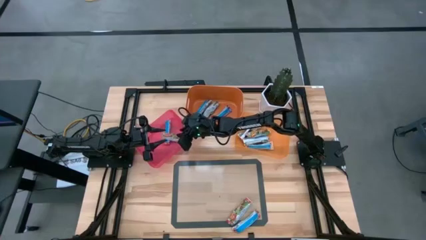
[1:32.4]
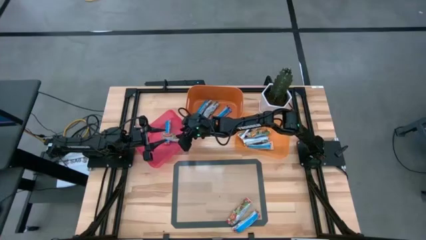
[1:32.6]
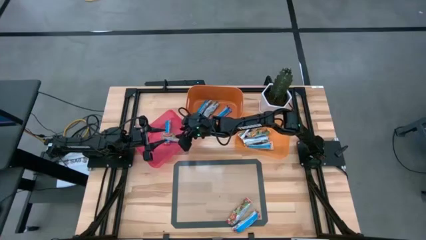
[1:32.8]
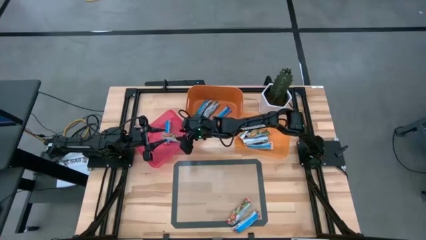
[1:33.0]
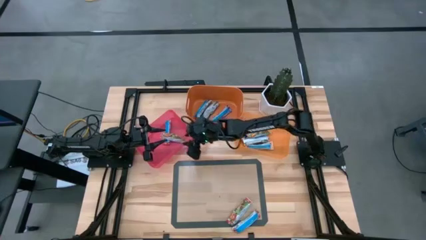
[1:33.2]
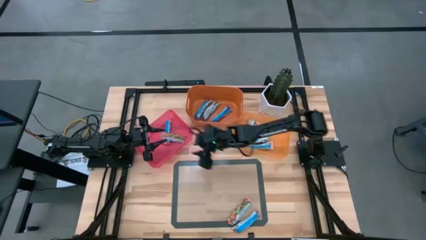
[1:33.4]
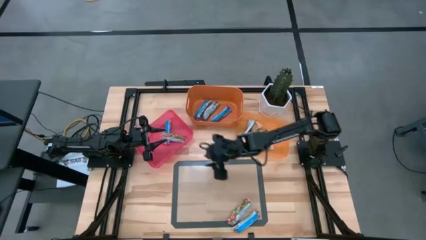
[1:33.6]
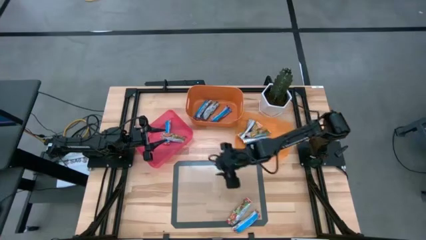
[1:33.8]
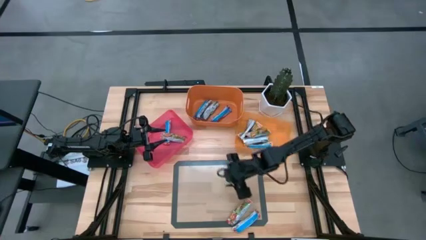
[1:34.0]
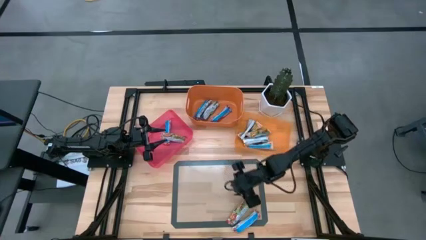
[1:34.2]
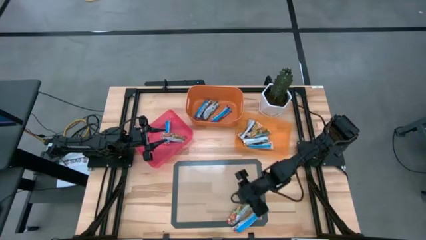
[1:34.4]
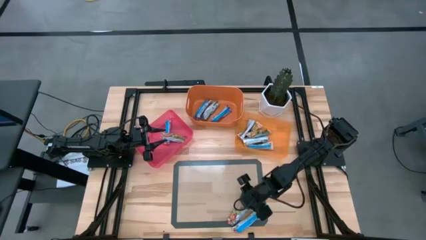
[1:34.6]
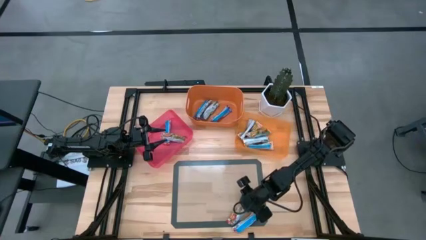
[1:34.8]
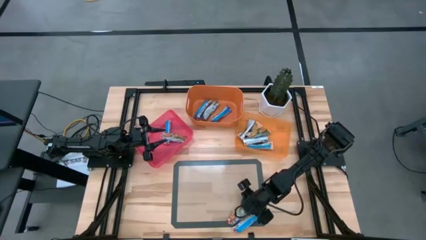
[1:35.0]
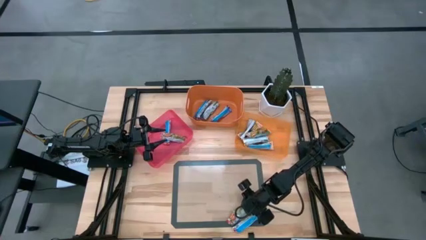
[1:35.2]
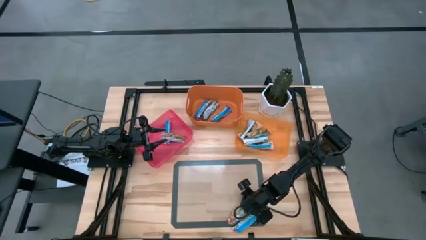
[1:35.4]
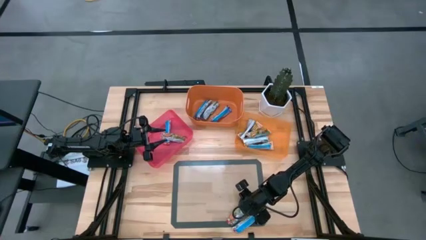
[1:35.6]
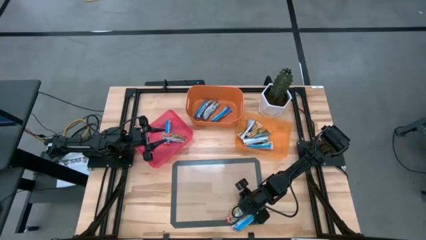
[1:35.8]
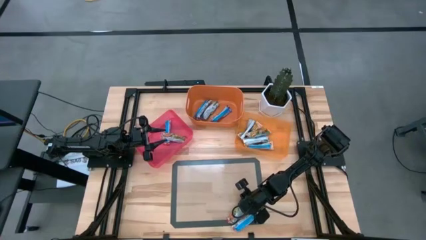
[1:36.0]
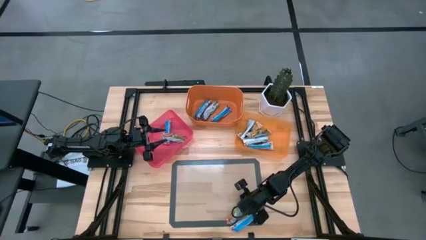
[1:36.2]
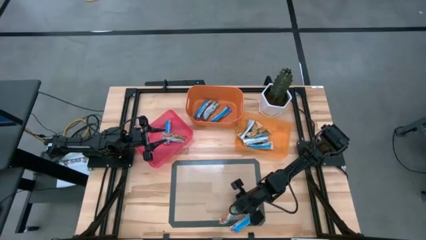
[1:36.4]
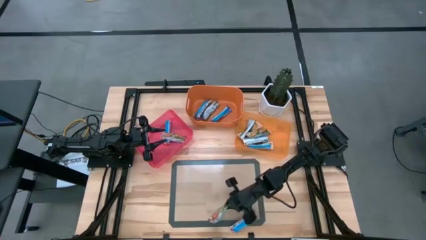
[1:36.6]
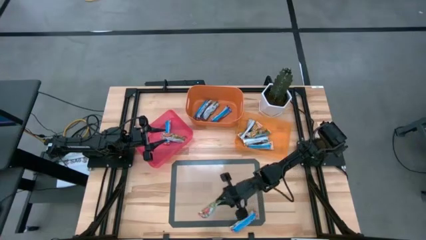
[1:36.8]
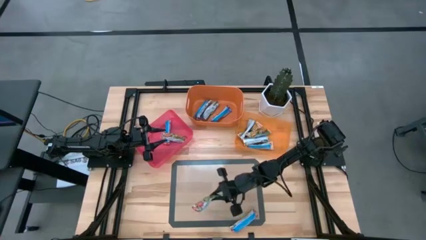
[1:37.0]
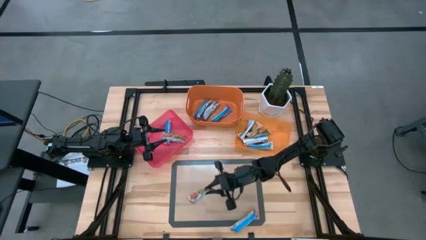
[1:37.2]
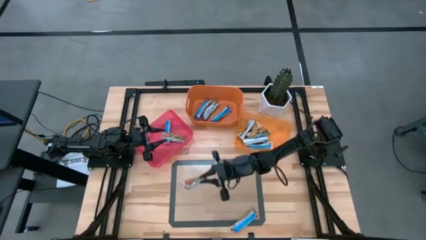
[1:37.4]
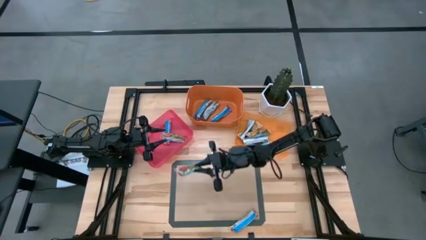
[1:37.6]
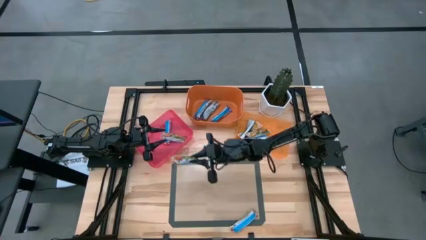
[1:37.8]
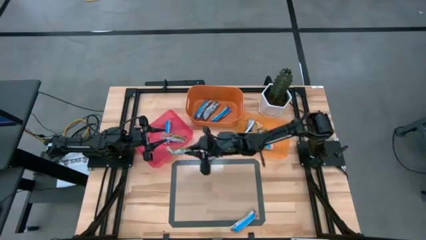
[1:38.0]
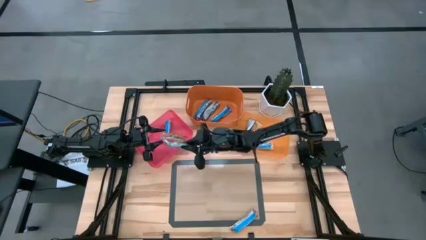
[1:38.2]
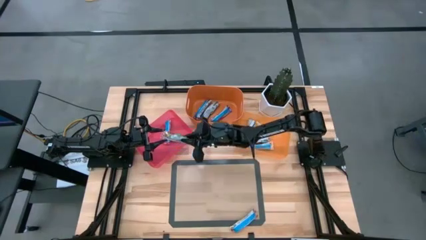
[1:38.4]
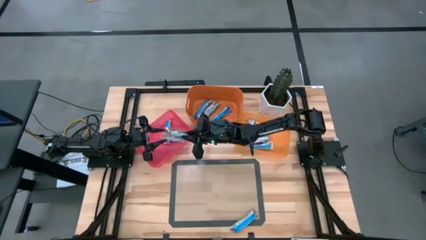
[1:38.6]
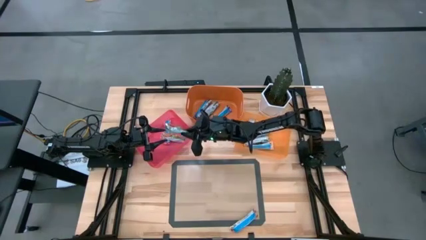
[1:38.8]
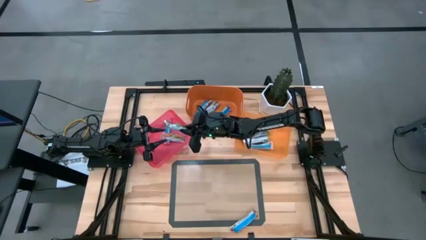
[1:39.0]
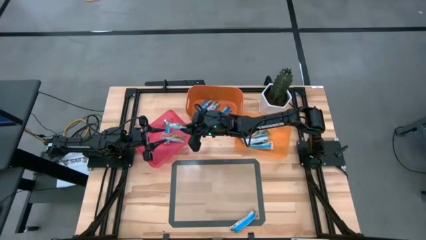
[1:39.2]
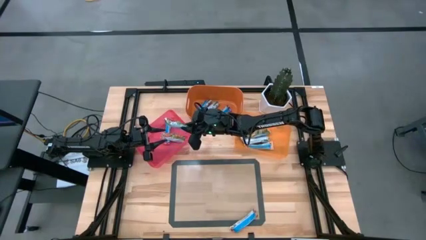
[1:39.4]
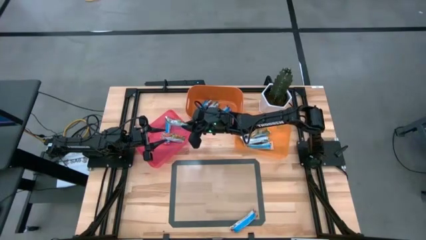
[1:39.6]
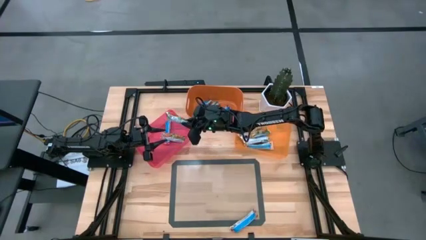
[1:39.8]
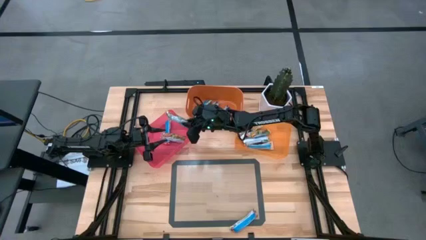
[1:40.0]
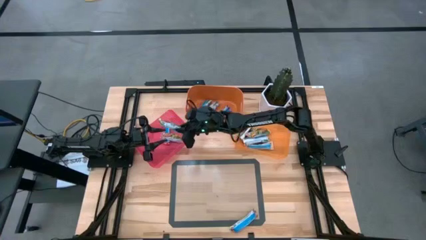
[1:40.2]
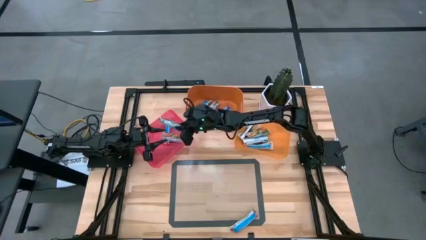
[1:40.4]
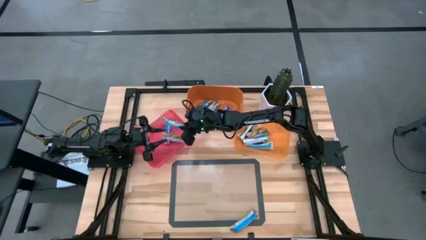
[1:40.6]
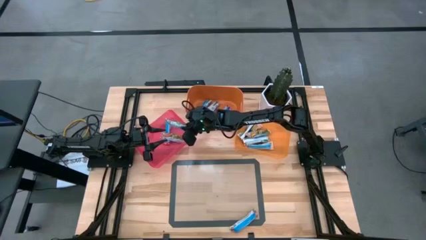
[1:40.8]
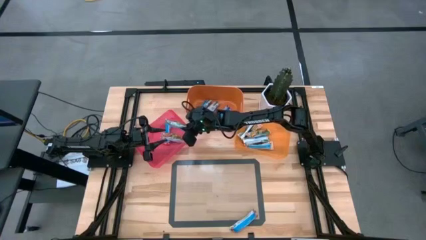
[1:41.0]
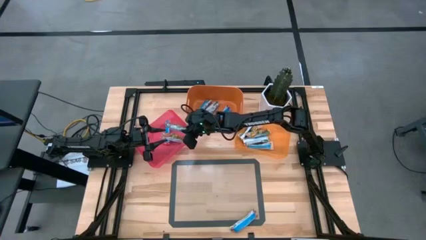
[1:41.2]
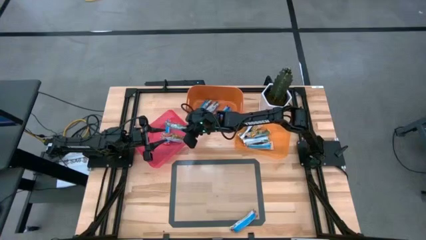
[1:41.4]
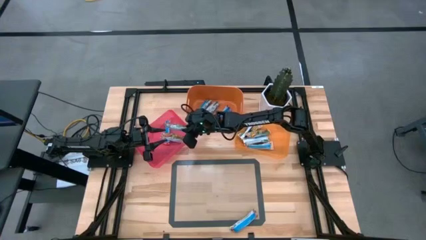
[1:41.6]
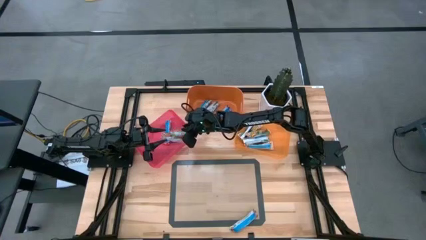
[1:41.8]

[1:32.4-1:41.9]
Task: Pick and place Granola Bars by type
Put the top red granola bar into the red bin

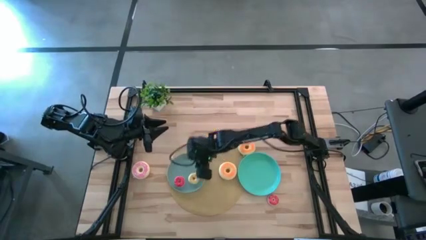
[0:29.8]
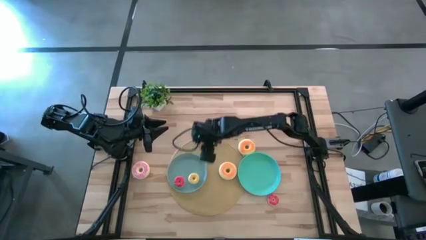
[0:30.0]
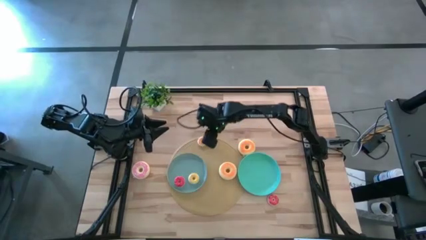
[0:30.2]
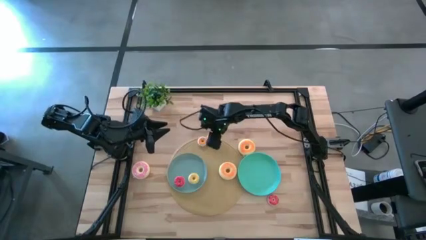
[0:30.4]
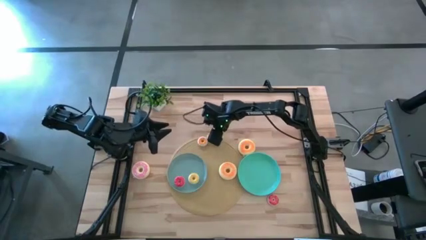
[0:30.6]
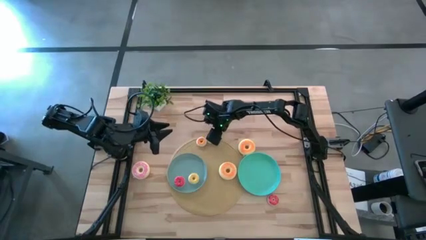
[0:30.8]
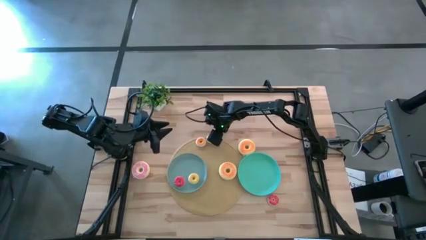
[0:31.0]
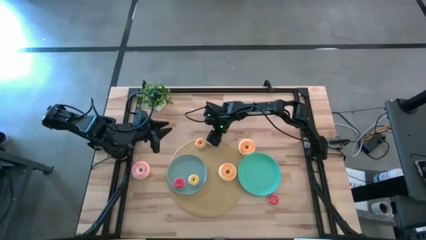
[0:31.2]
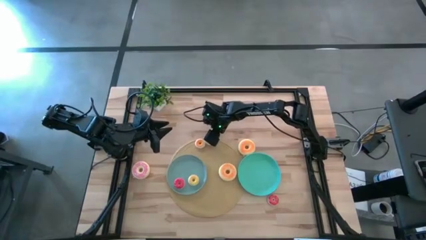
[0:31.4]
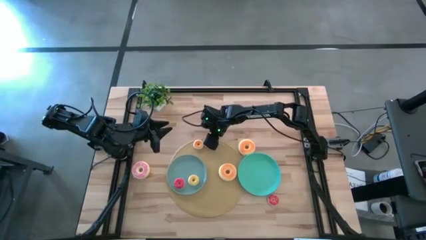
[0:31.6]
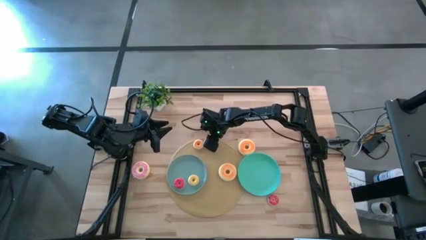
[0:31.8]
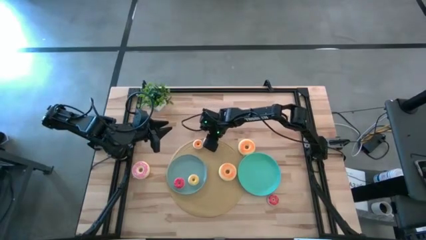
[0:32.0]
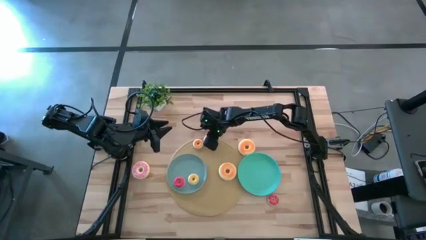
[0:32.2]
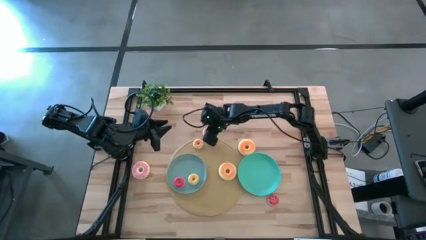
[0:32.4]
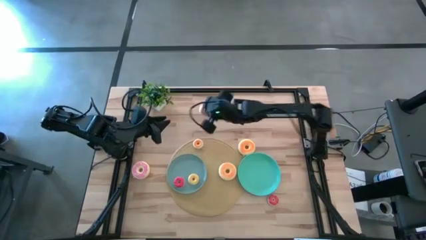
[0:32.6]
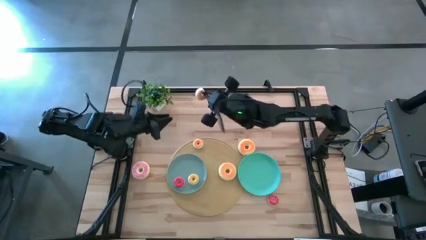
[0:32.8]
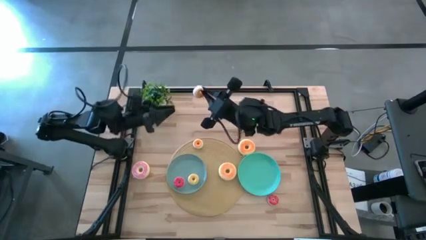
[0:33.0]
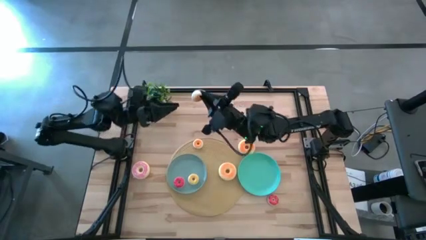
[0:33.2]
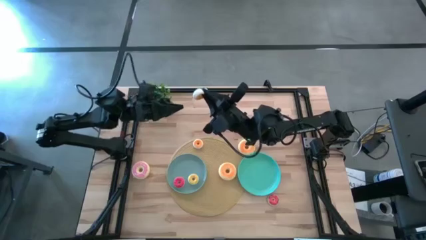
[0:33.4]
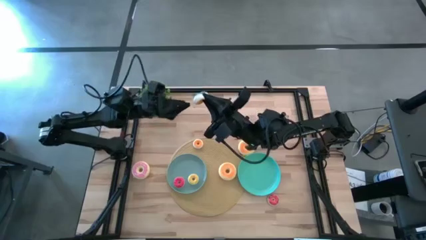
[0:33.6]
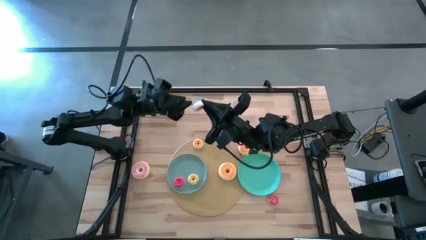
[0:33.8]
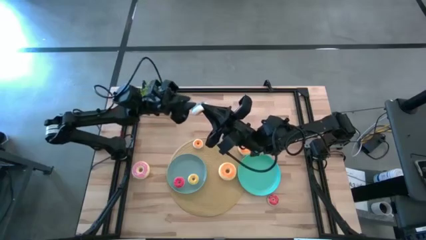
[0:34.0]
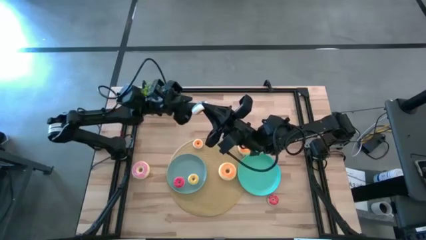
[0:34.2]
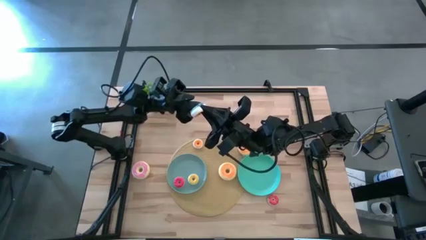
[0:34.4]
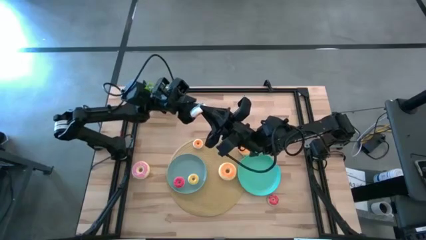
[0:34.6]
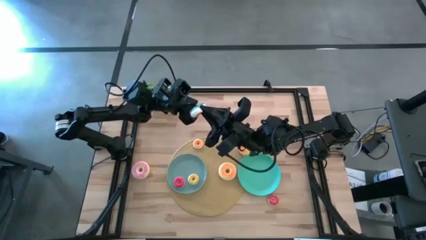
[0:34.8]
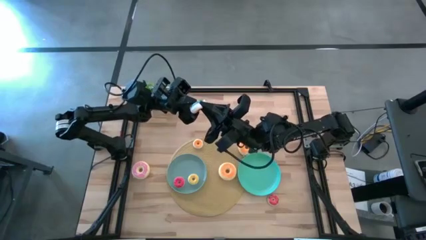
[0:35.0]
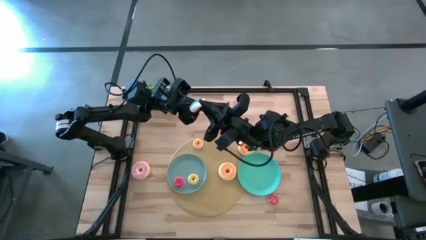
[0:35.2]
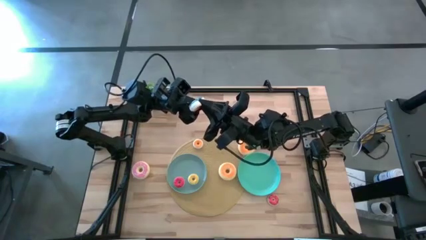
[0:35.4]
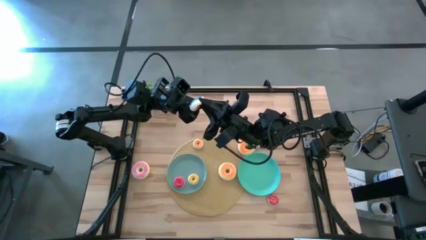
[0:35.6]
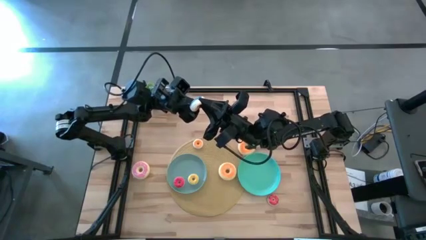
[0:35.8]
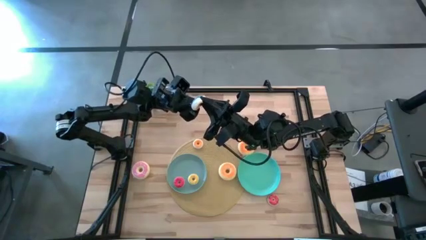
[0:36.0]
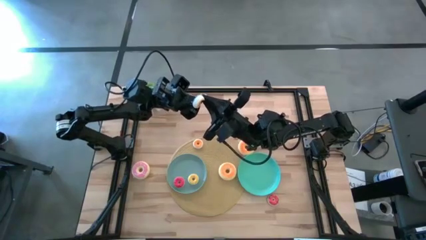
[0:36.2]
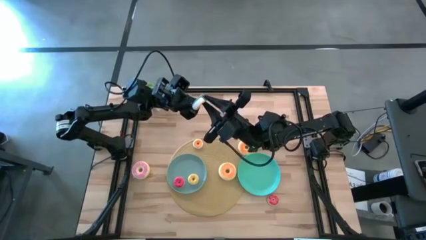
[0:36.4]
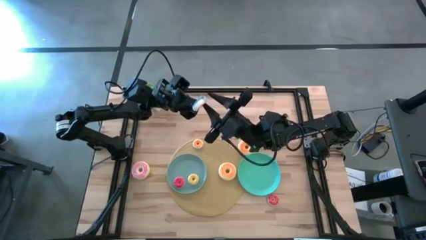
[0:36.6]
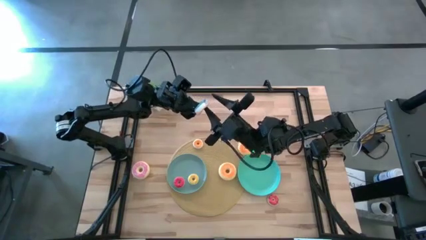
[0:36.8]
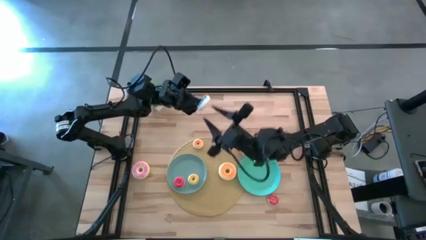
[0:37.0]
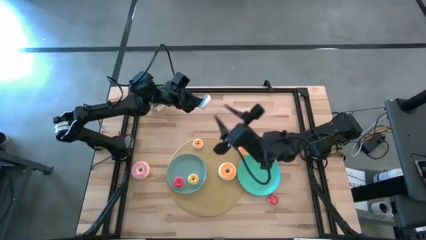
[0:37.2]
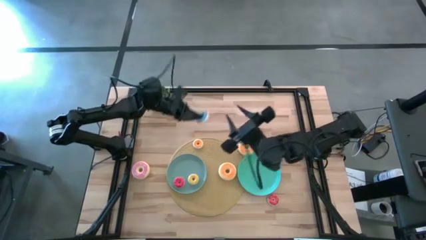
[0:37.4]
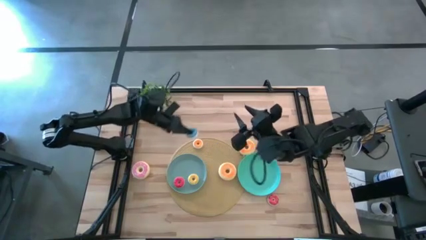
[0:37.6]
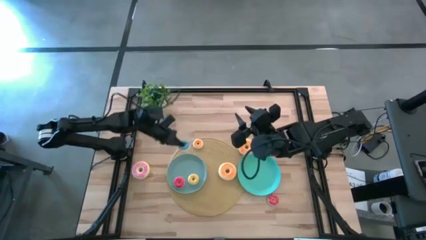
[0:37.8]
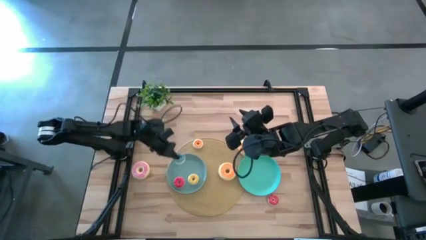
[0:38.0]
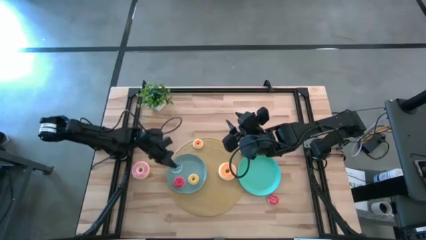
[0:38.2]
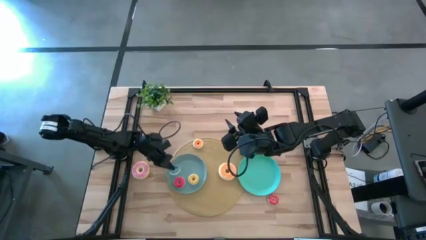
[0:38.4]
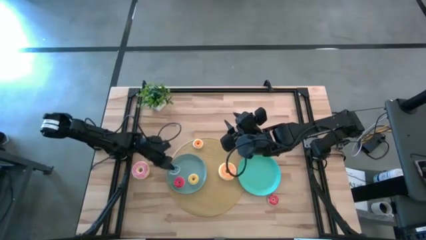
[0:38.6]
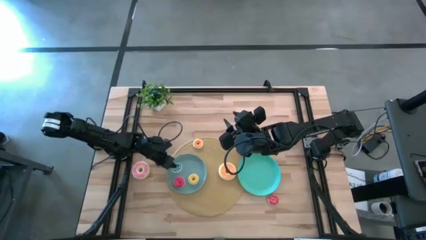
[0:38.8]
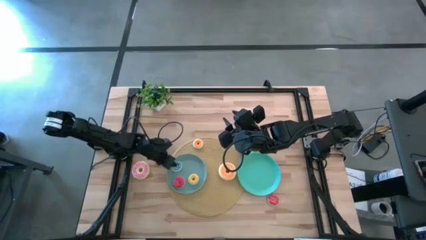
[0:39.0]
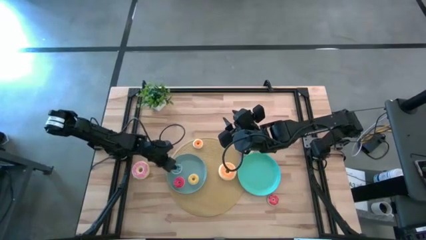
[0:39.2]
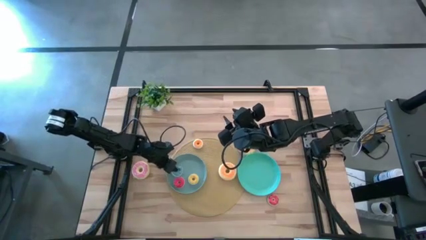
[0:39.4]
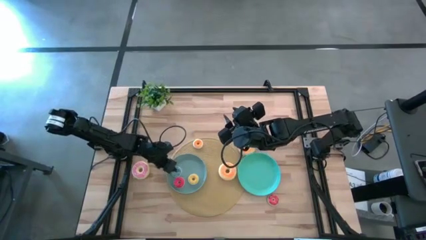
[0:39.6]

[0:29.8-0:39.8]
Task: Pick & Place donuts
Put the small blue donut on the blue plate
